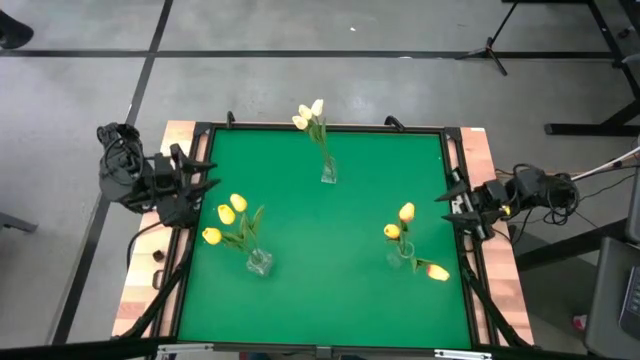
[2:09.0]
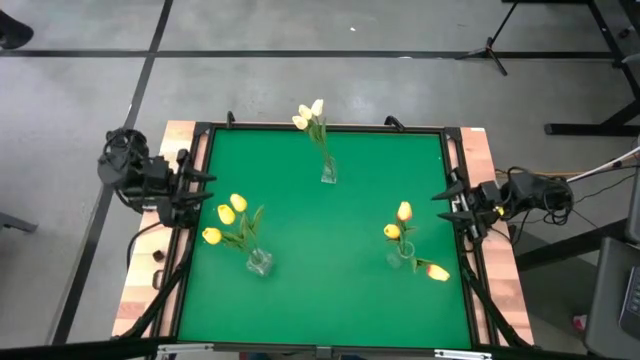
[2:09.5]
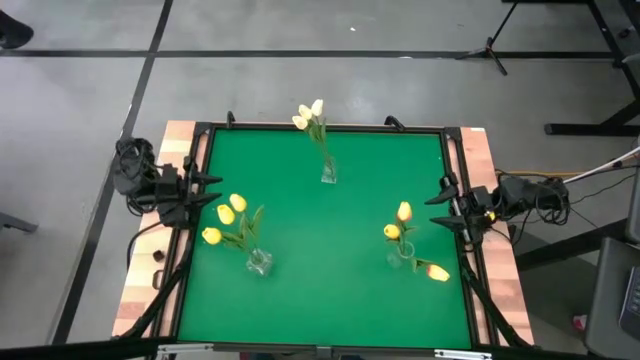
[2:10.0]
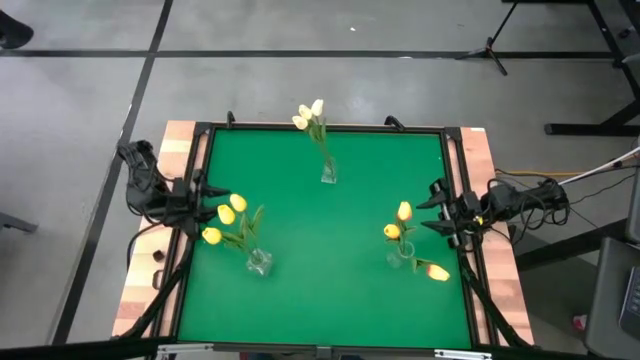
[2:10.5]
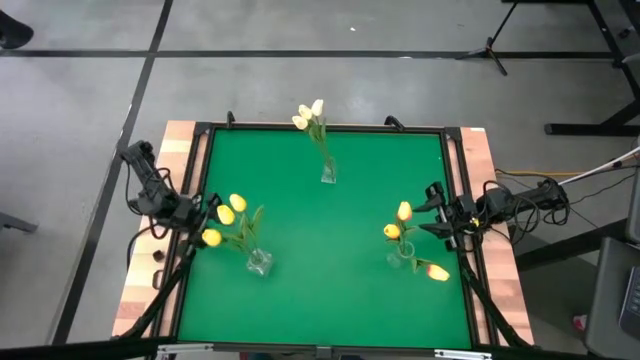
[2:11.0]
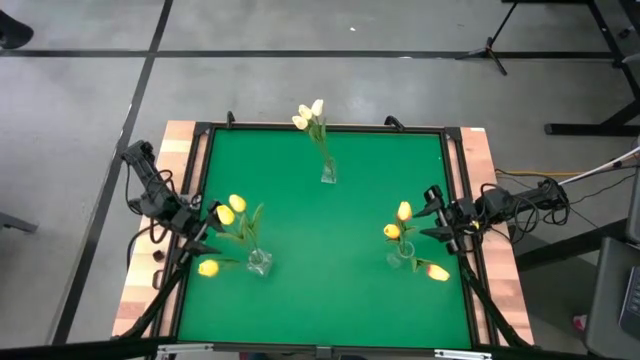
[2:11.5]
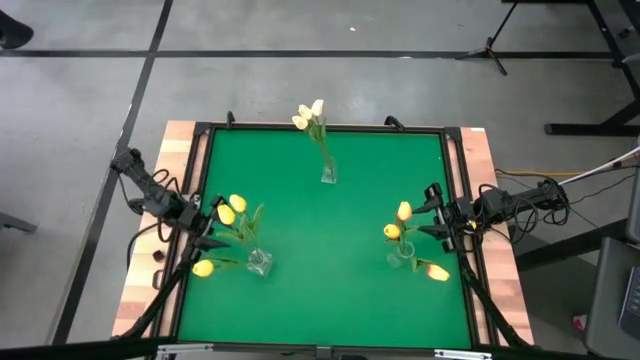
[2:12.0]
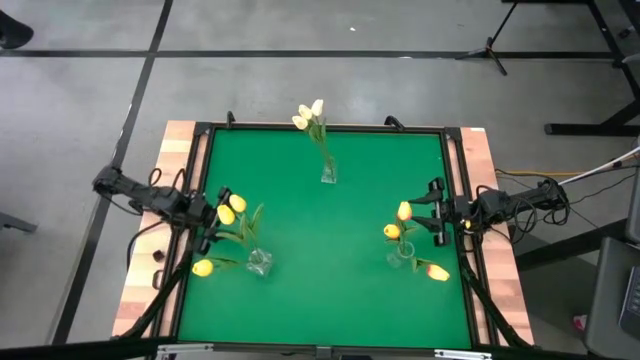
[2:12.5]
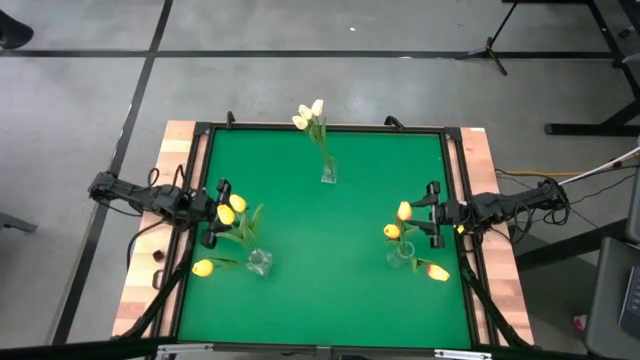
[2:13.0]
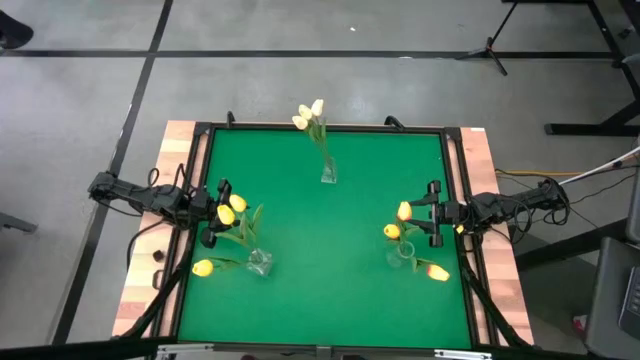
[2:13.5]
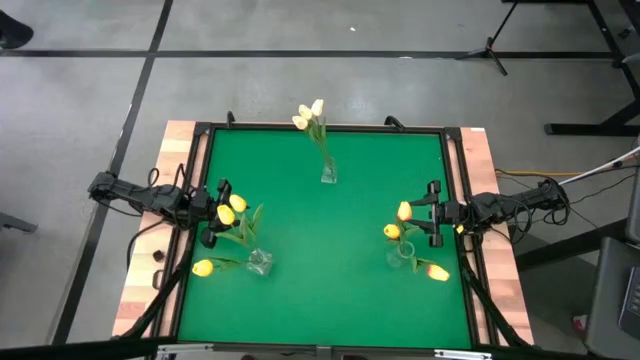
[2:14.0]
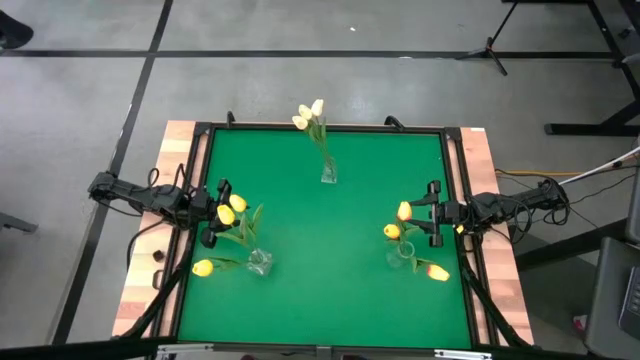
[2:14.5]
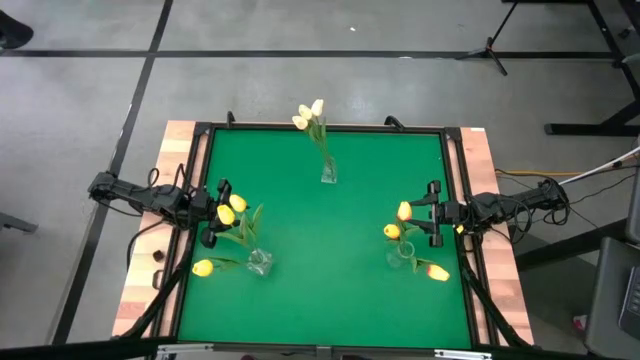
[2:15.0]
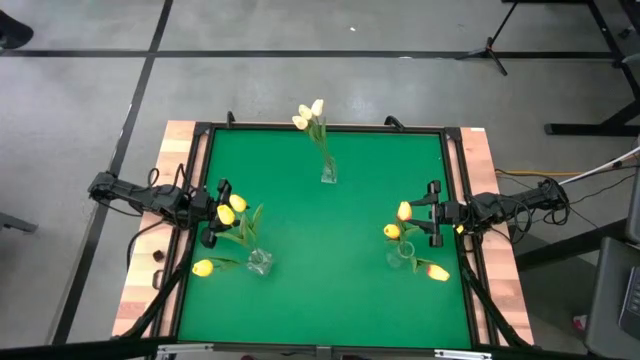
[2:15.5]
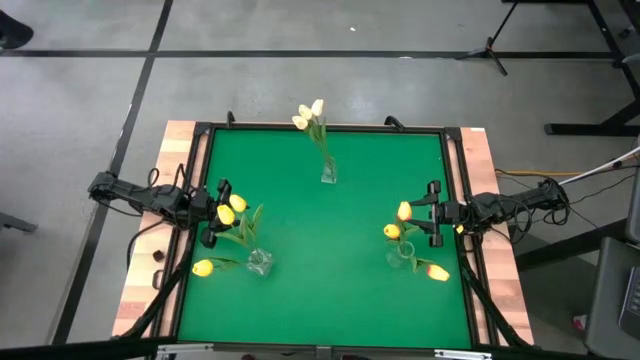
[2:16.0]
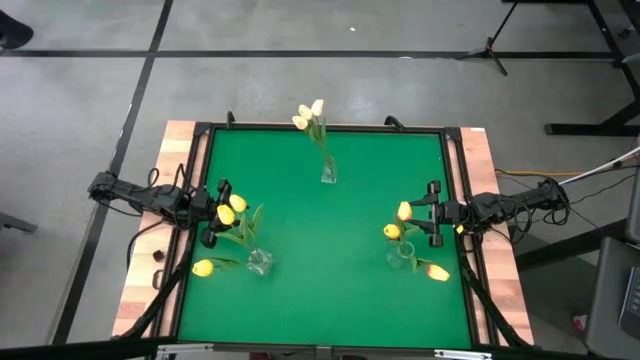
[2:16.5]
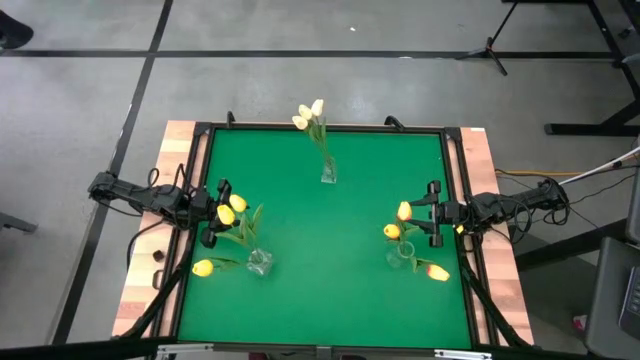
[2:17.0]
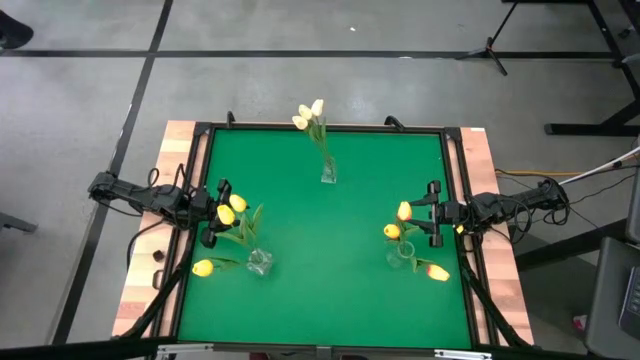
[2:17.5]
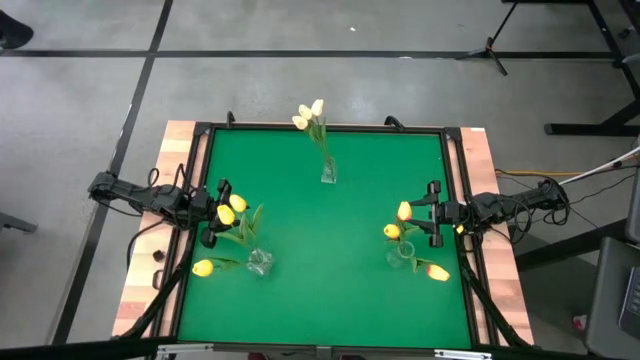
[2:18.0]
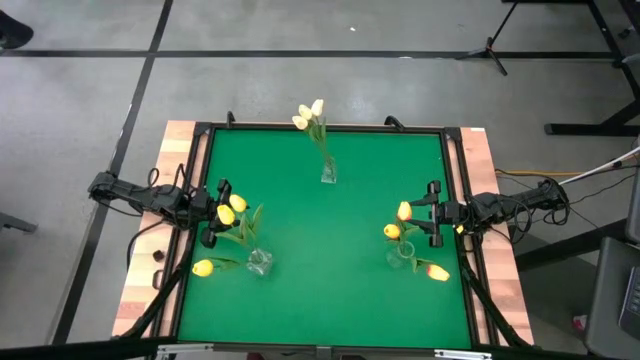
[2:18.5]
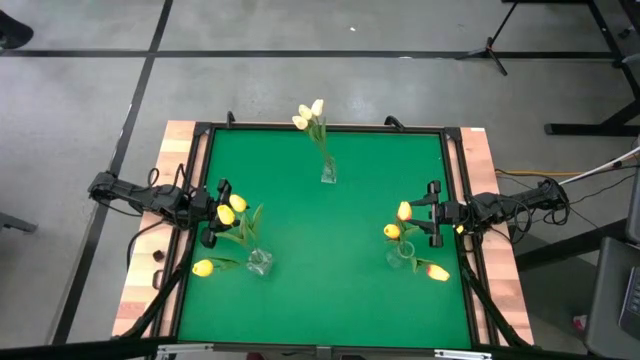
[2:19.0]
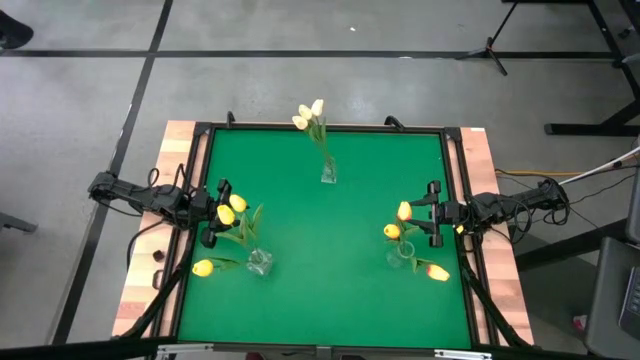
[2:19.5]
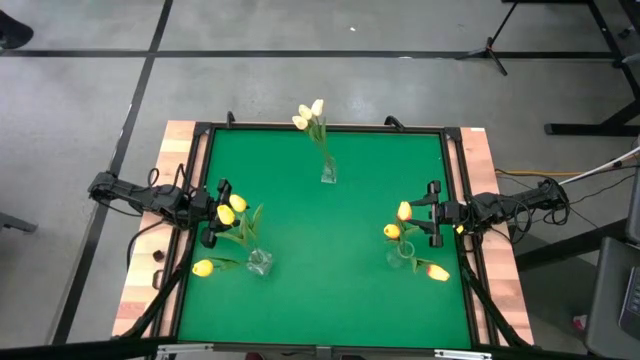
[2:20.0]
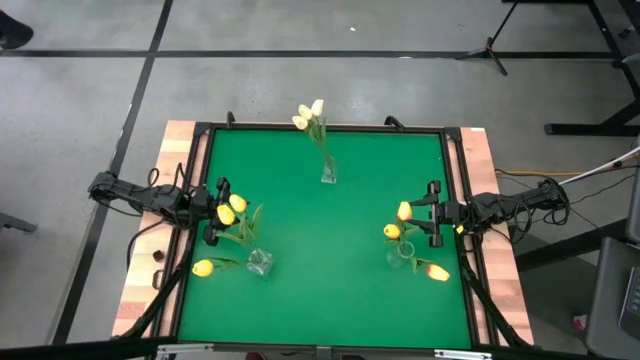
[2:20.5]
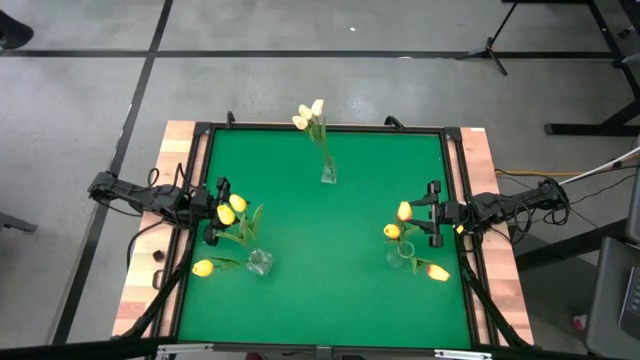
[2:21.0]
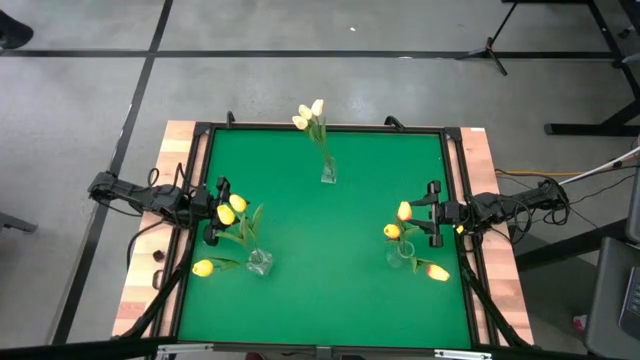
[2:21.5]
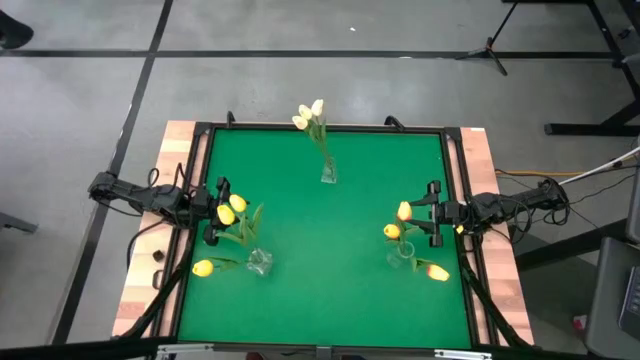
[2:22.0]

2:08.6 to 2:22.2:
Task: Sort flowers into vase by color
Return to Home Position

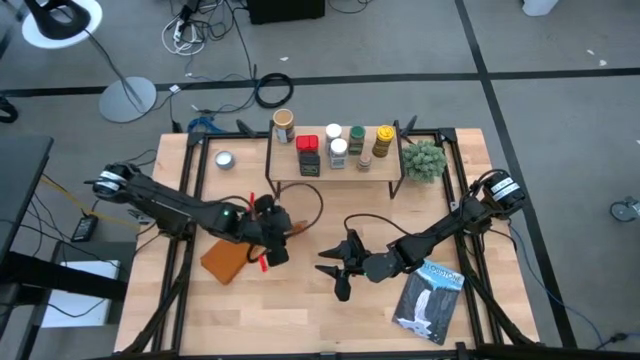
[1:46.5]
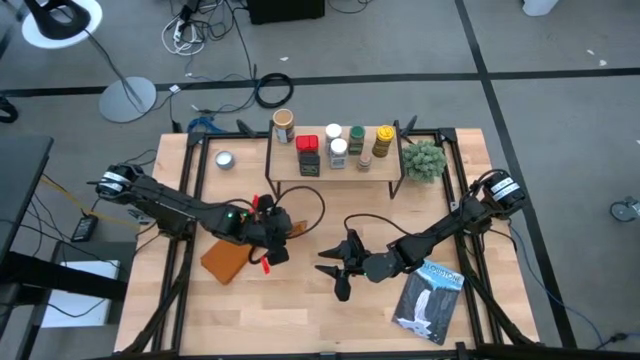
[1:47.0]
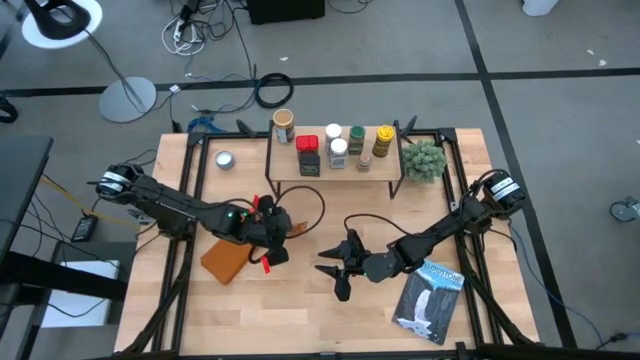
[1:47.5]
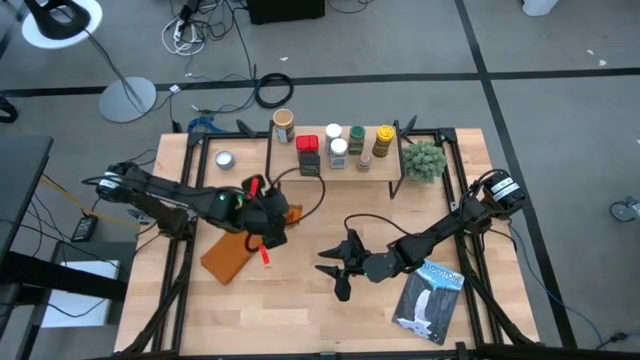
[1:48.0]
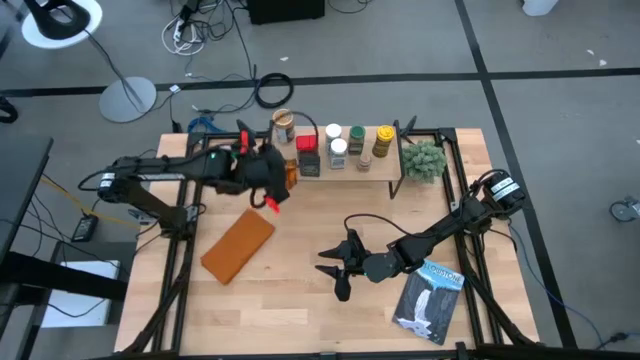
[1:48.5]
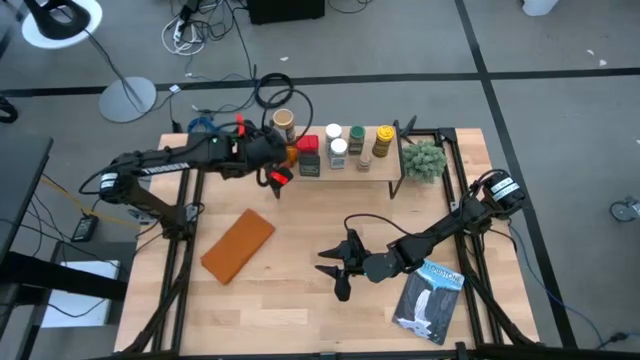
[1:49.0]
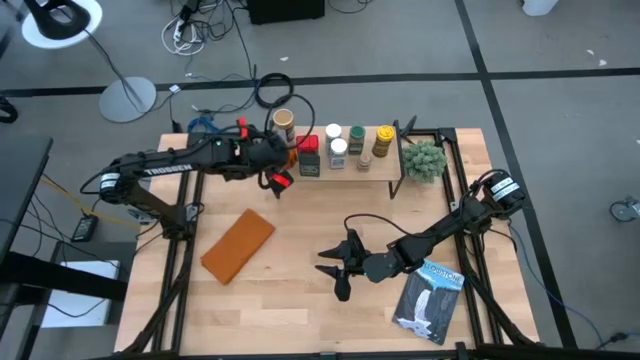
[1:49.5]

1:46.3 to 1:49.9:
Task: Shelf spices
Put the brown seasoning bag on the shelf
